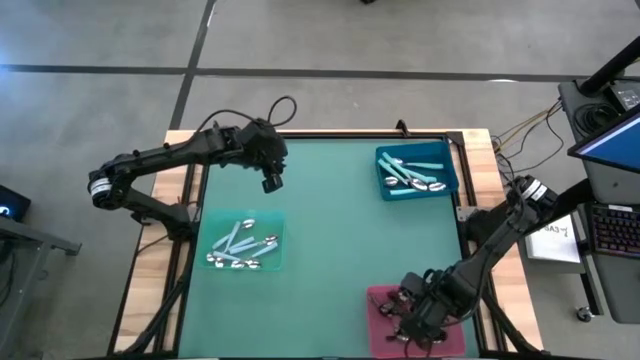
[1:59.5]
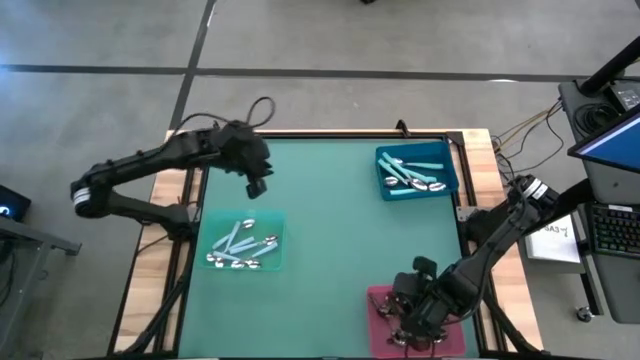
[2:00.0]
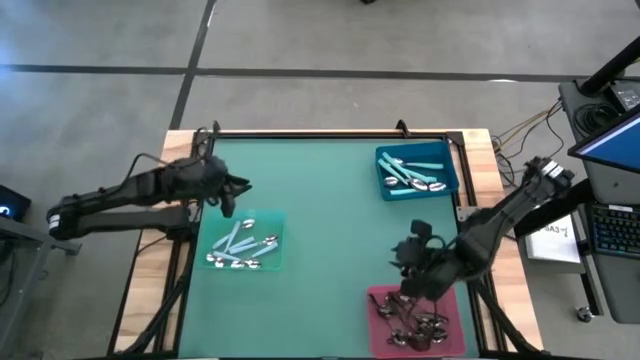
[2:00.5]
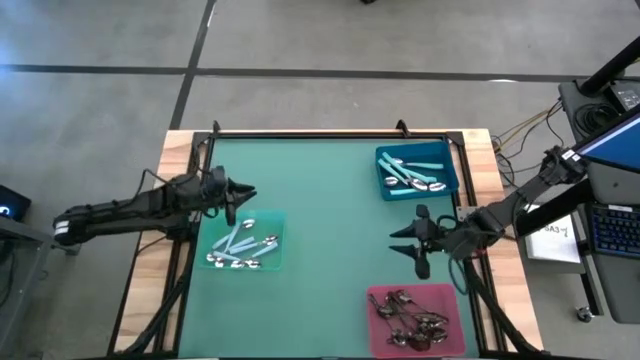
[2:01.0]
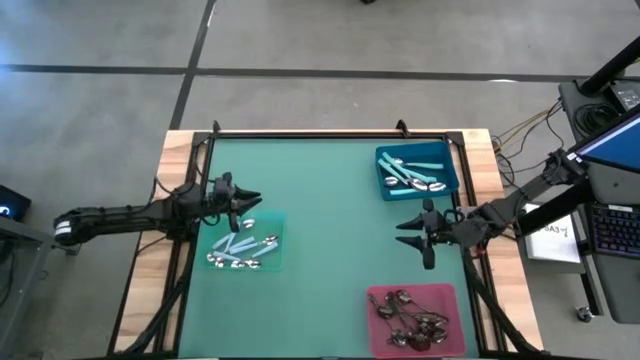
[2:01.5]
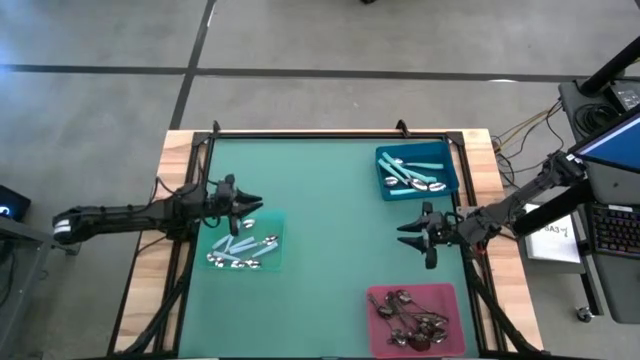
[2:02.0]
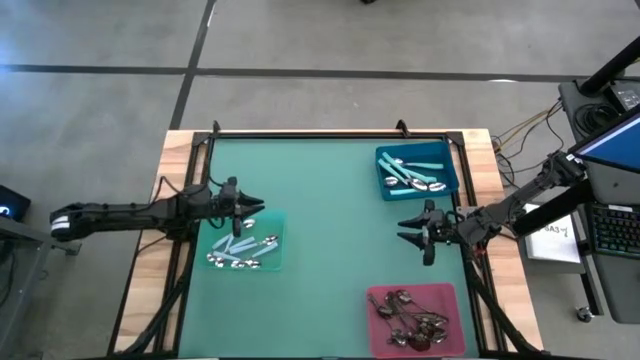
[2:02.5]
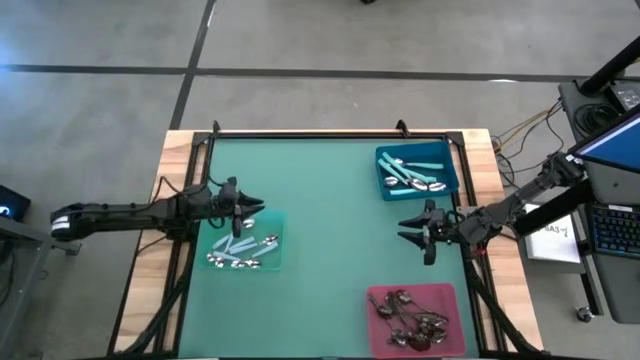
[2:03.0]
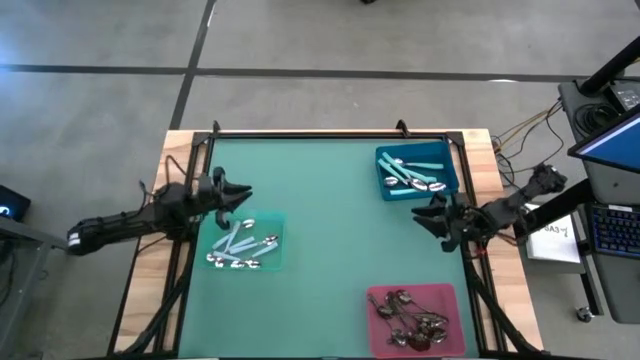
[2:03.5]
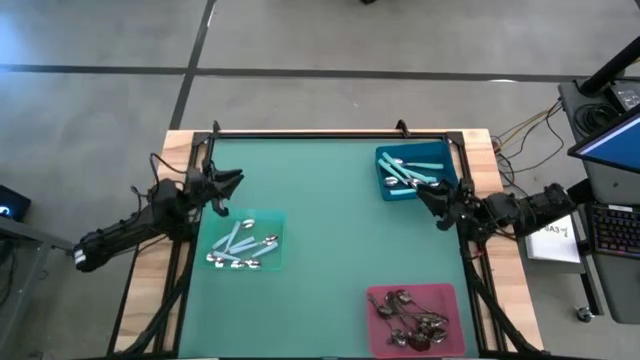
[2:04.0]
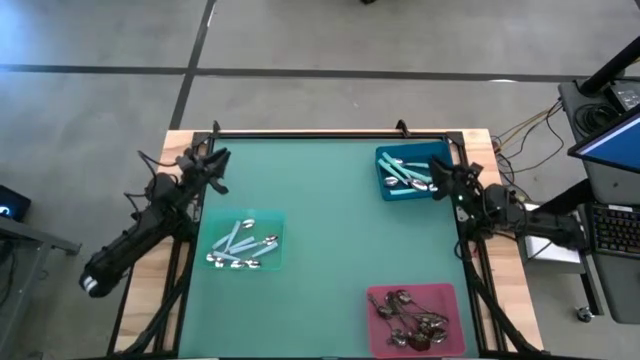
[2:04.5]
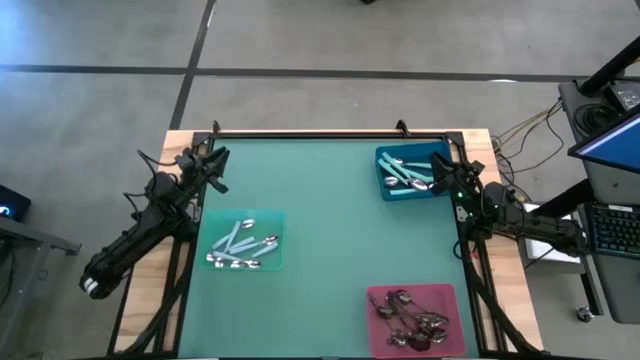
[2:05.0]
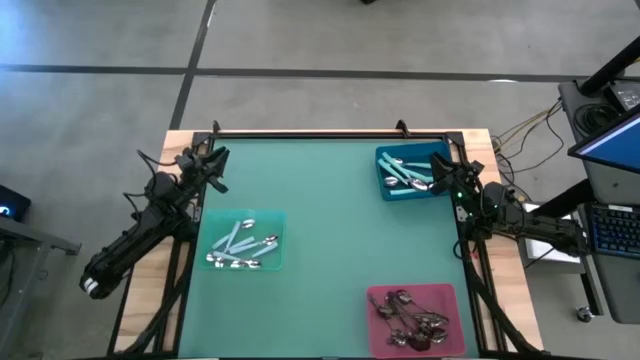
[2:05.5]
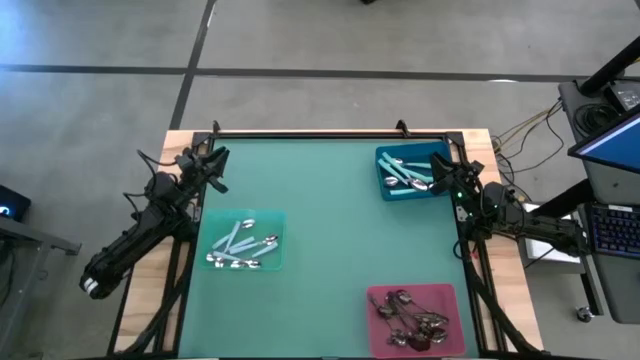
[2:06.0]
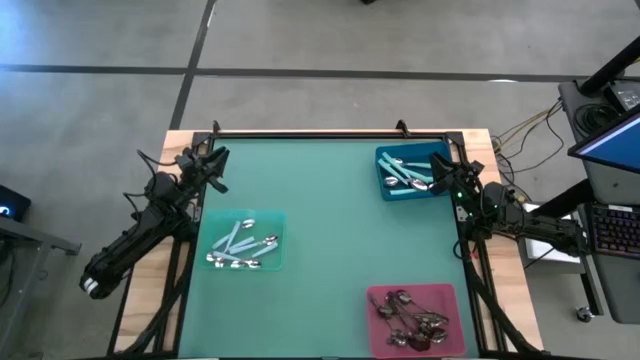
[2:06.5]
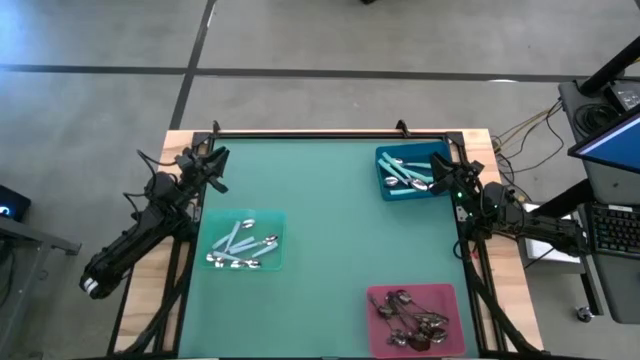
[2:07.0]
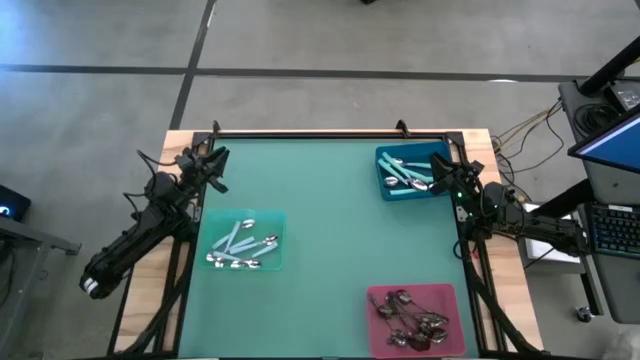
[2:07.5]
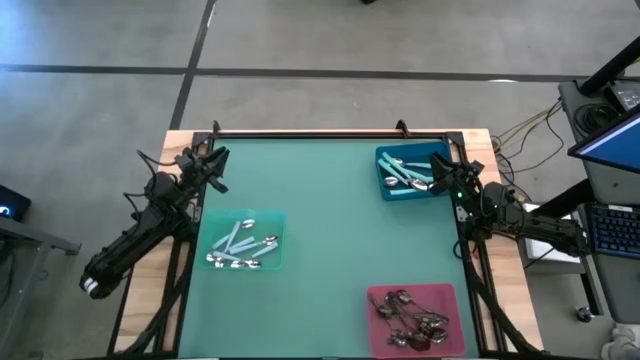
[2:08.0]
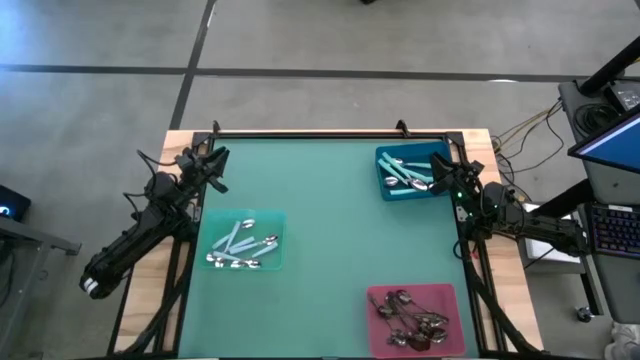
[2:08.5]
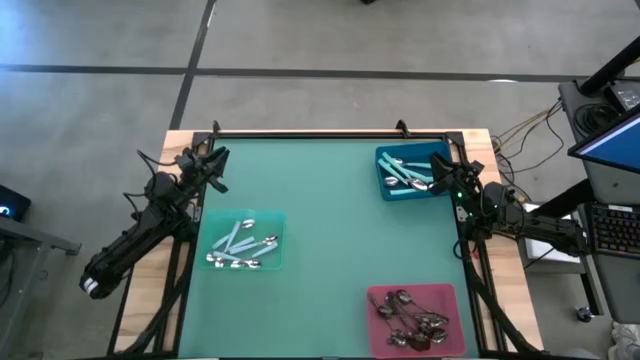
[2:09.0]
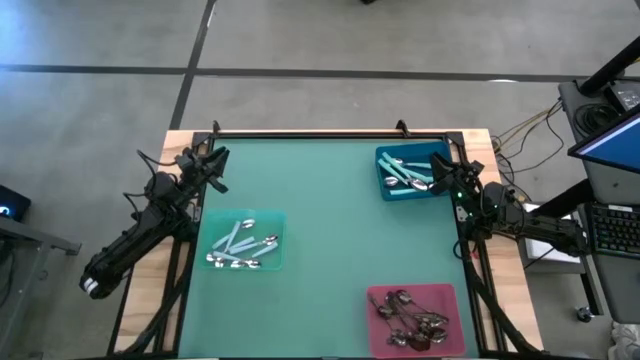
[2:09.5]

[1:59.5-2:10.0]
Task: Sort silverware by color (type)
Return to Home Position

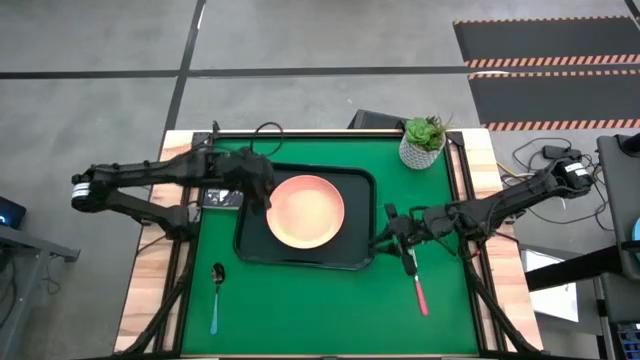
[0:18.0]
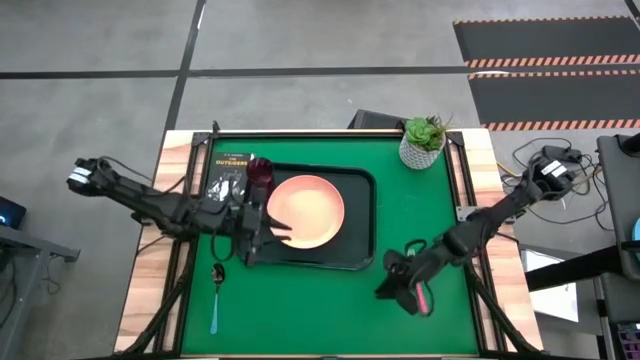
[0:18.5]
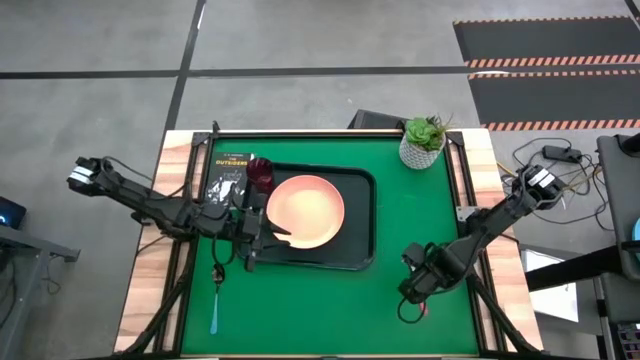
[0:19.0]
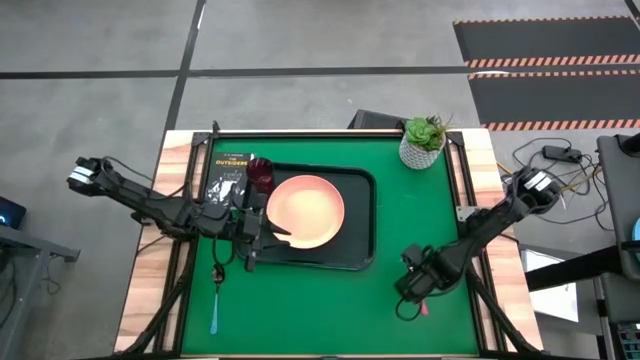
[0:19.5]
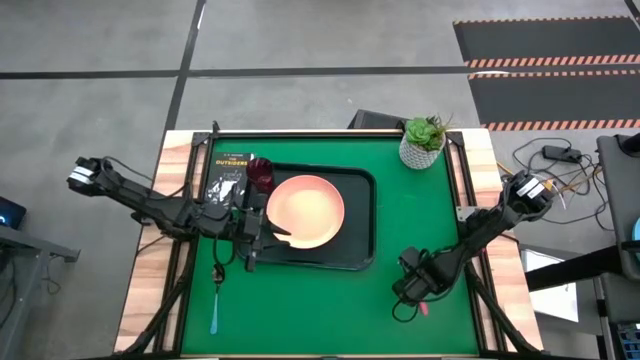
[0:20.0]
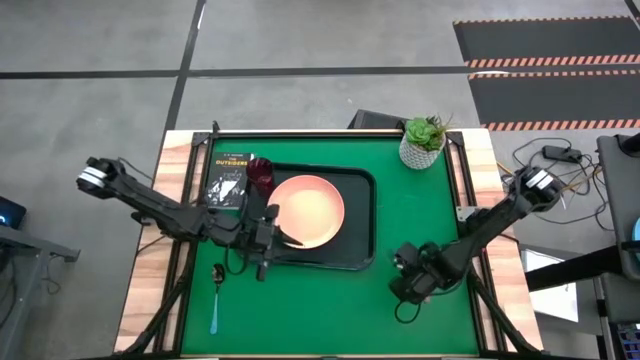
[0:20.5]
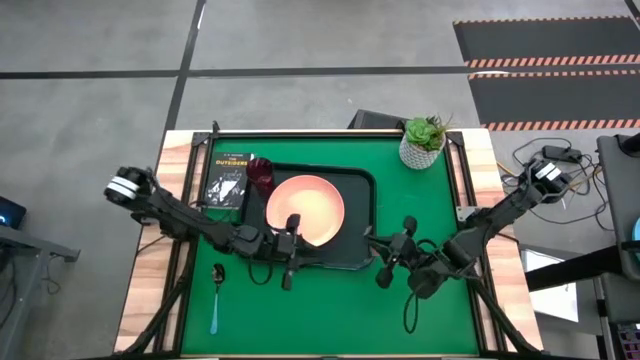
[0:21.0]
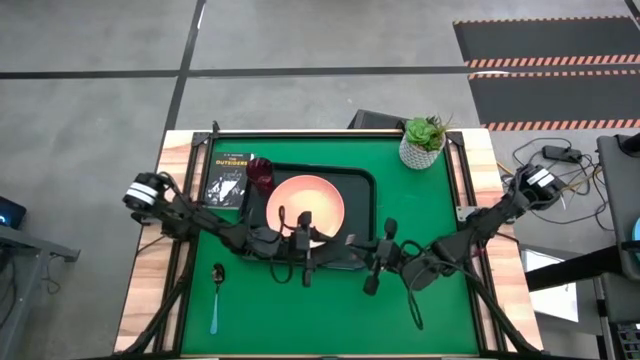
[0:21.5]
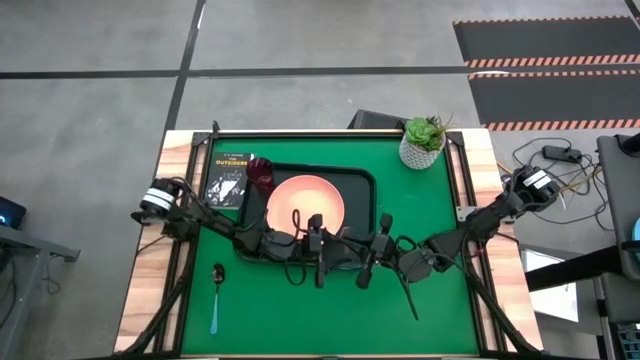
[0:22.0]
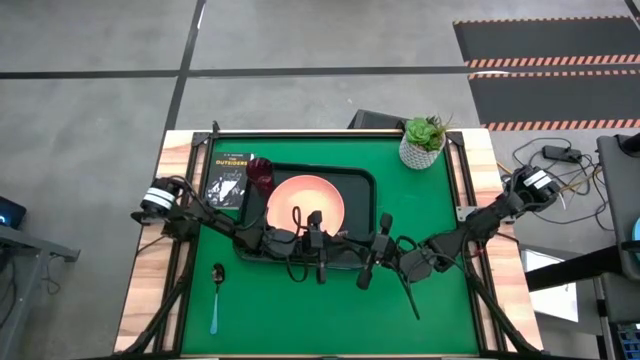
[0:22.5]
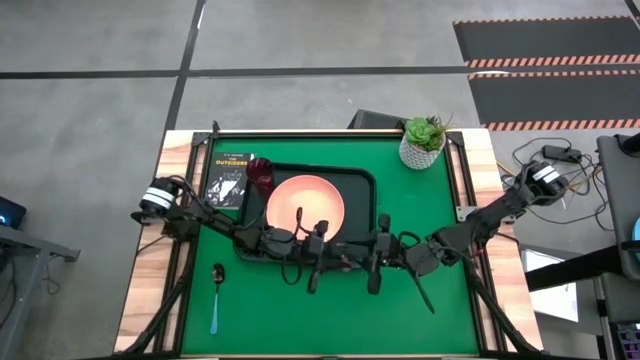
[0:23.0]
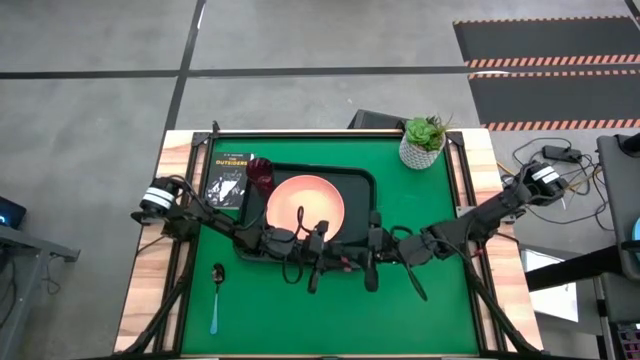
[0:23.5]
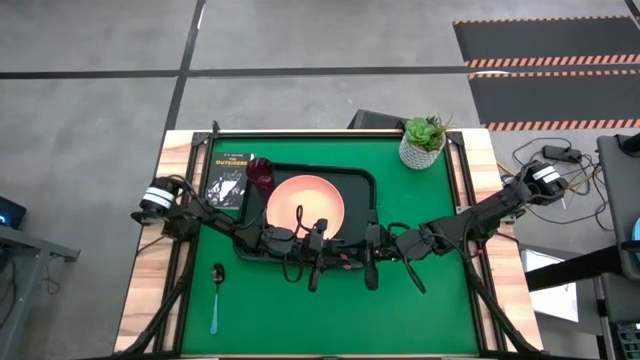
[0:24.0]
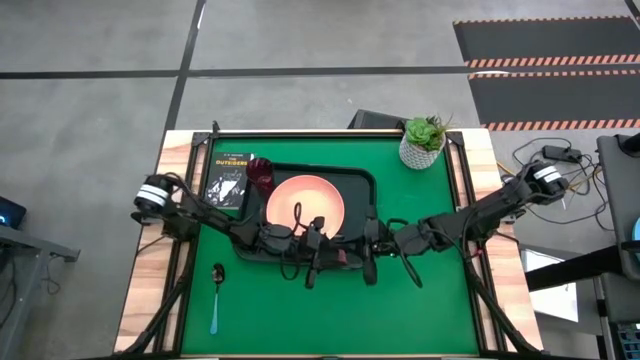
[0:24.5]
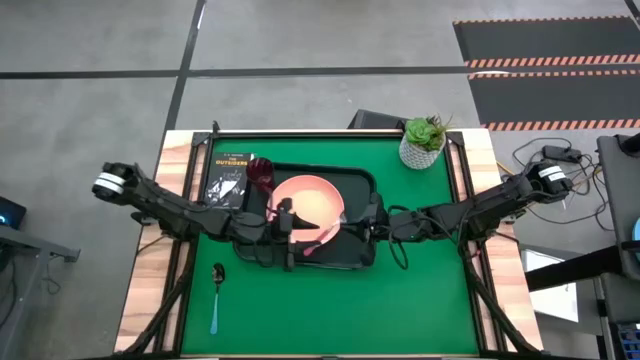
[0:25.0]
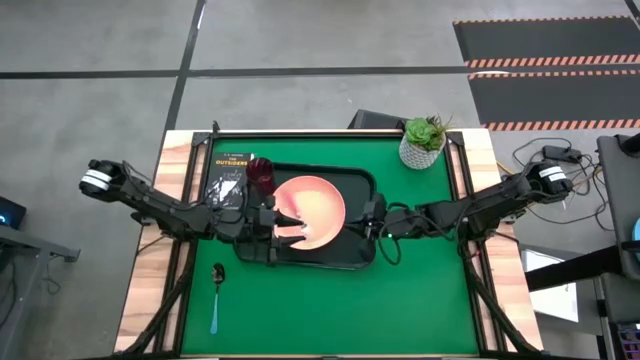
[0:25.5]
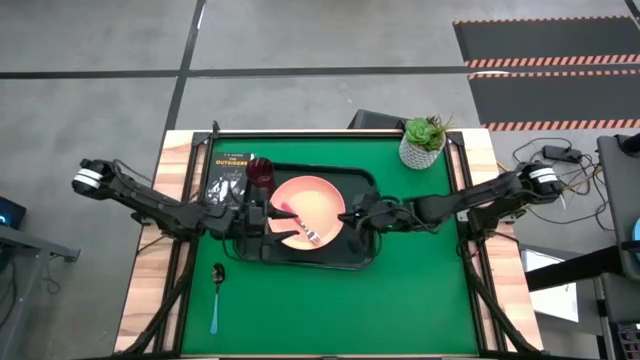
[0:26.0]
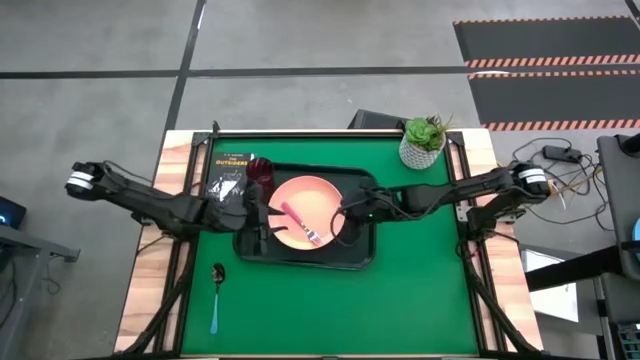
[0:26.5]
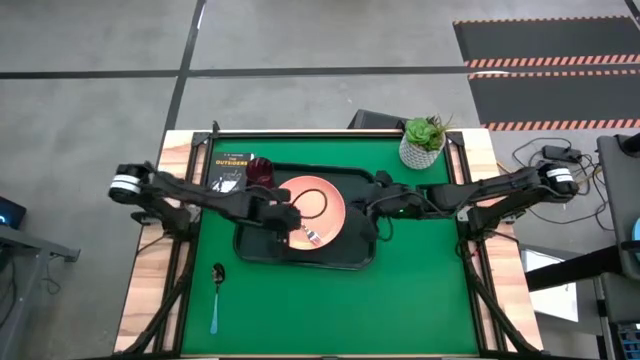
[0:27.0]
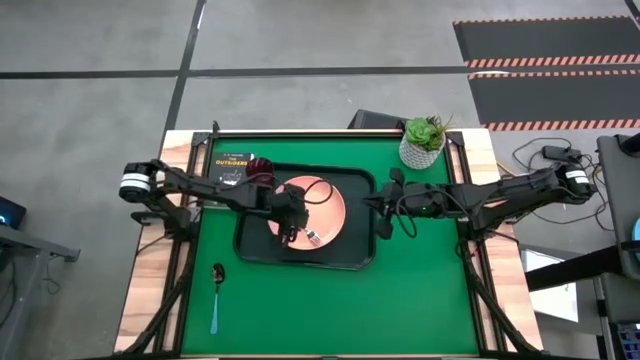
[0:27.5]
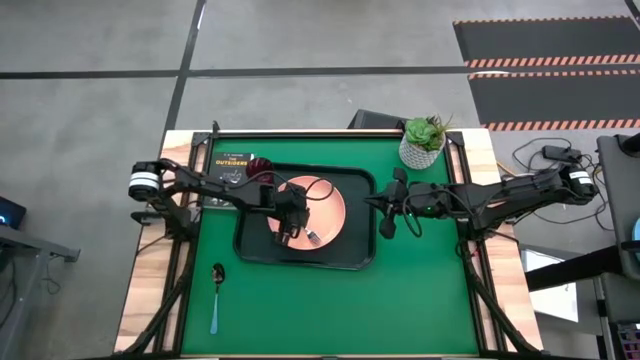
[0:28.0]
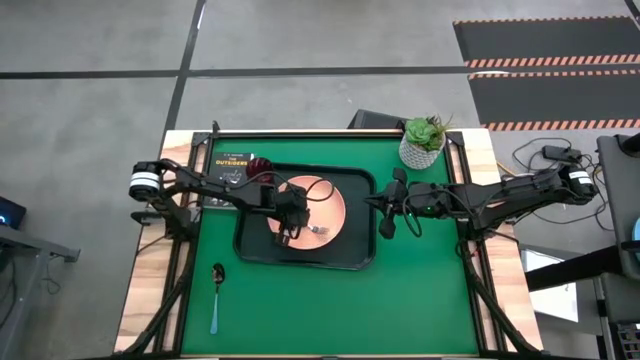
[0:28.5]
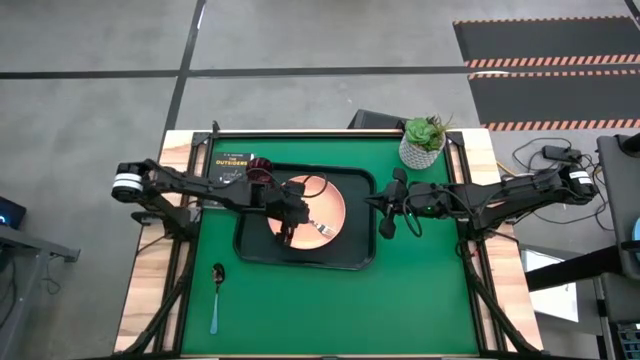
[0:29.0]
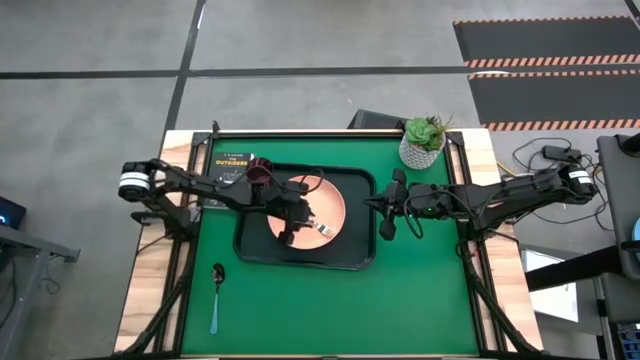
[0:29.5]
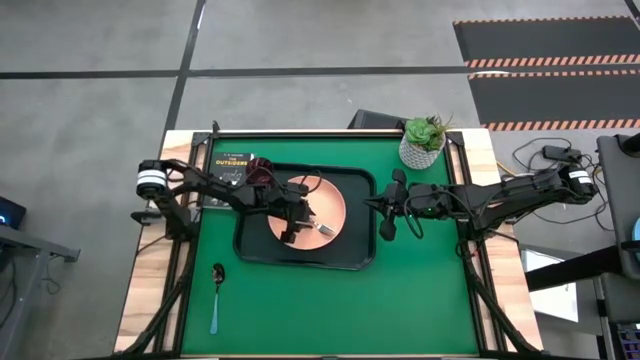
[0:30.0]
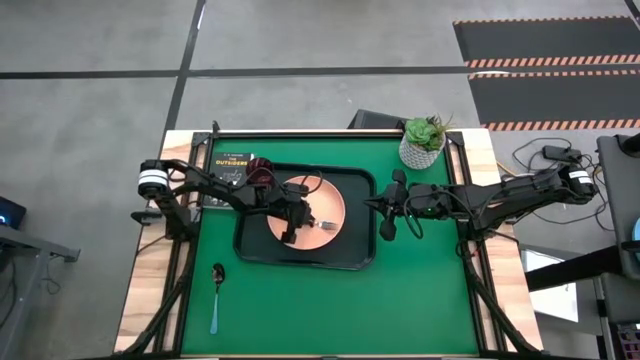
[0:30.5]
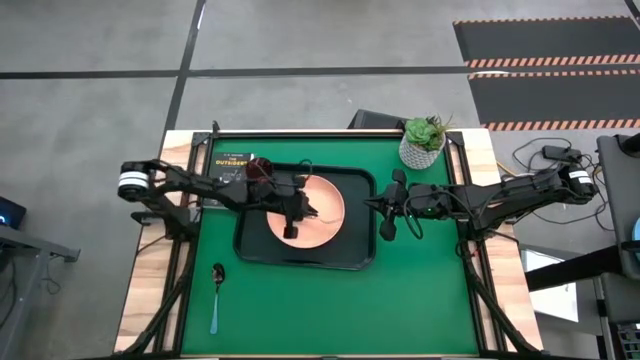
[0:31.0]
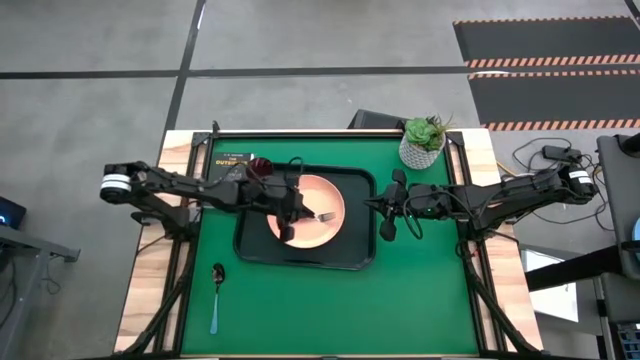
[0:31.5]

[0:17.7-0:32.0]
Task: Pick and place plate/cup/fork/spoon on tray
Put the pink fork on the black table tray
